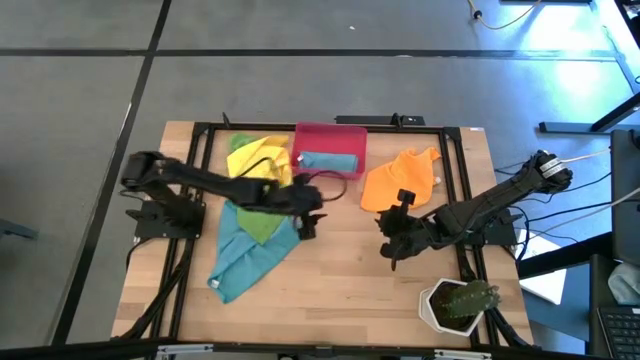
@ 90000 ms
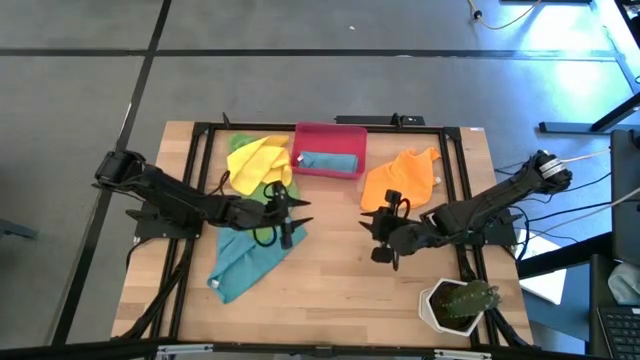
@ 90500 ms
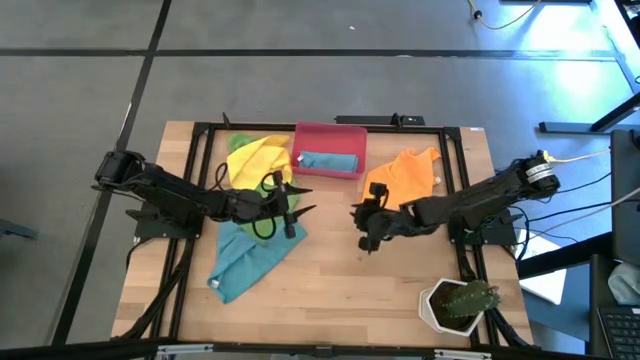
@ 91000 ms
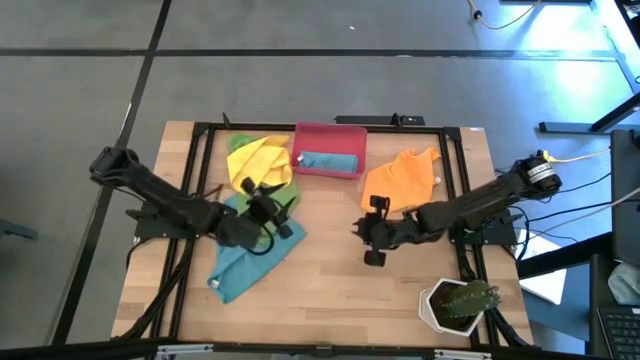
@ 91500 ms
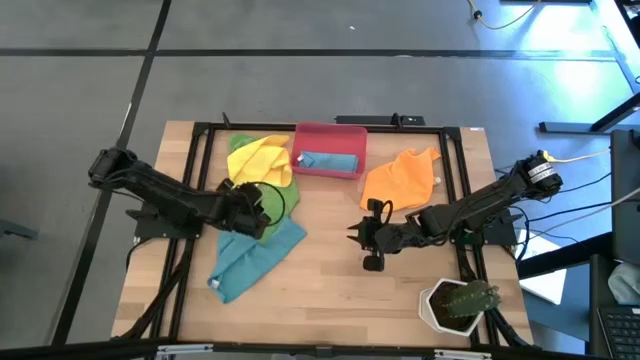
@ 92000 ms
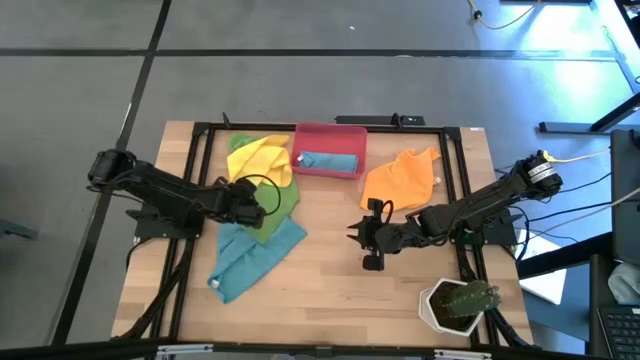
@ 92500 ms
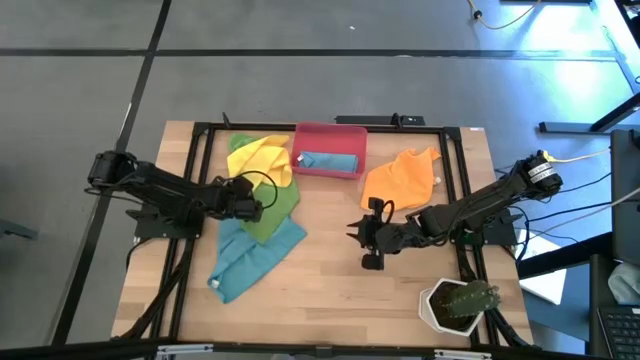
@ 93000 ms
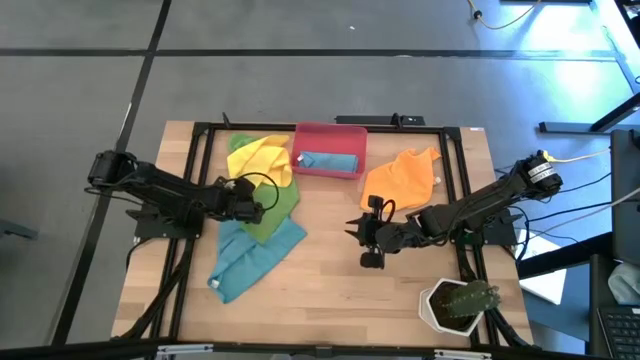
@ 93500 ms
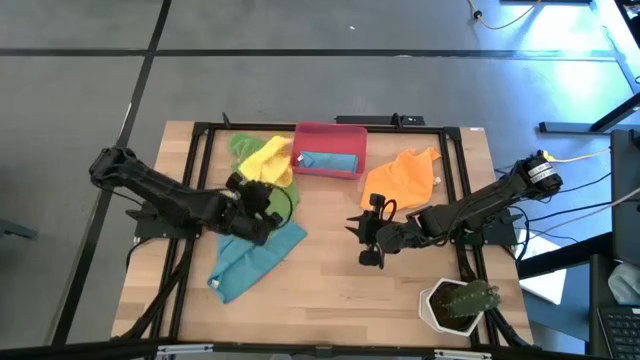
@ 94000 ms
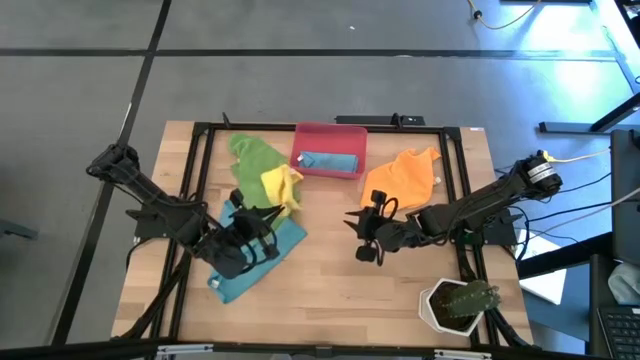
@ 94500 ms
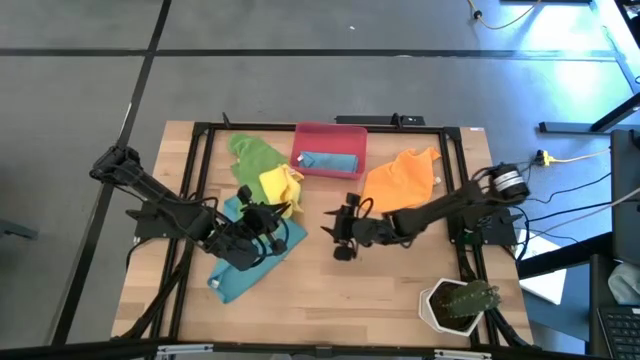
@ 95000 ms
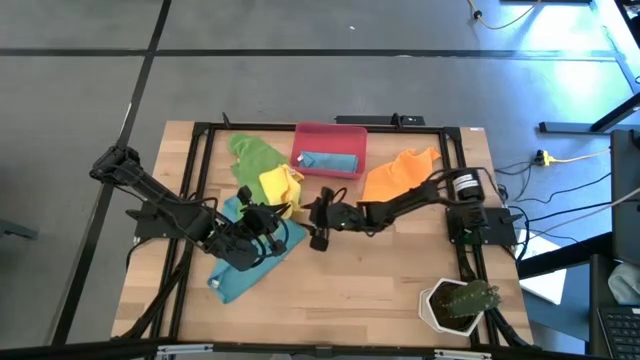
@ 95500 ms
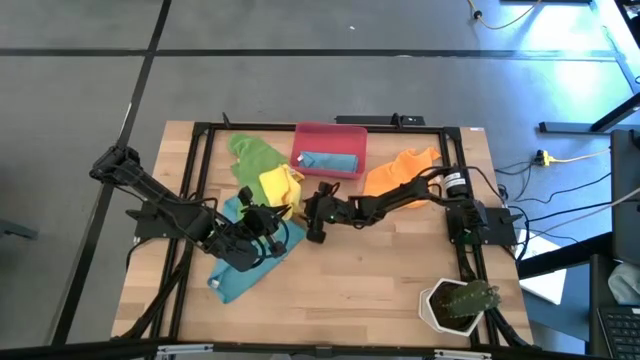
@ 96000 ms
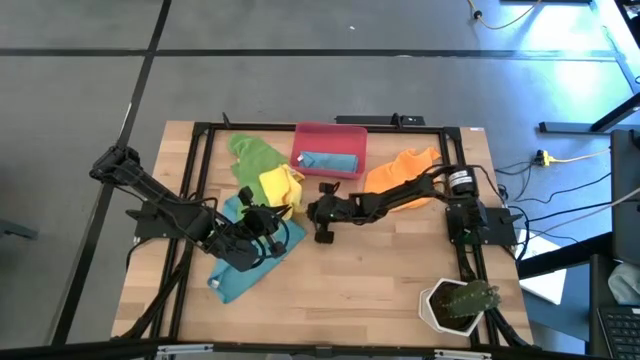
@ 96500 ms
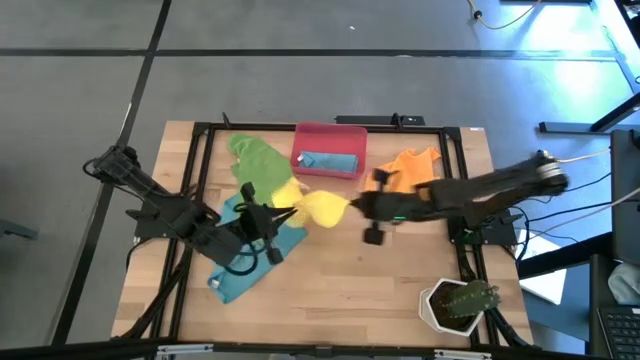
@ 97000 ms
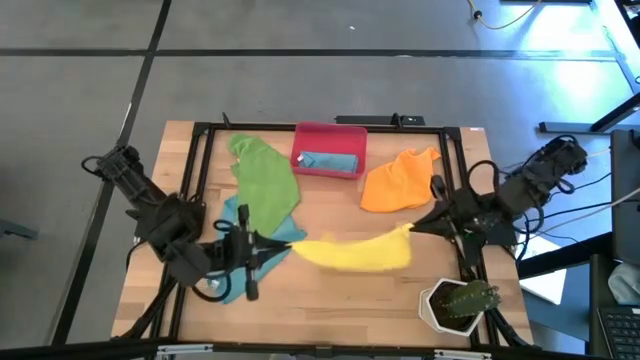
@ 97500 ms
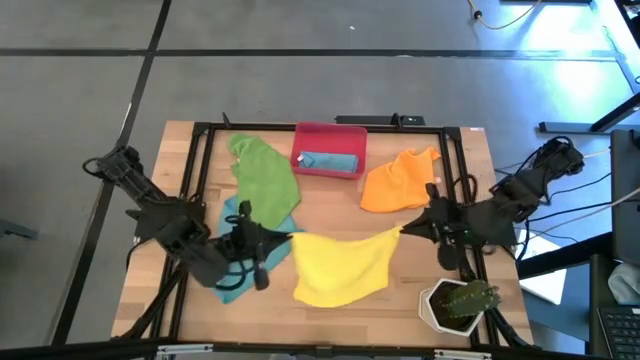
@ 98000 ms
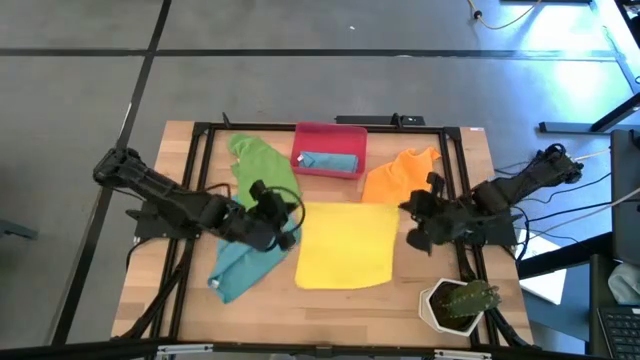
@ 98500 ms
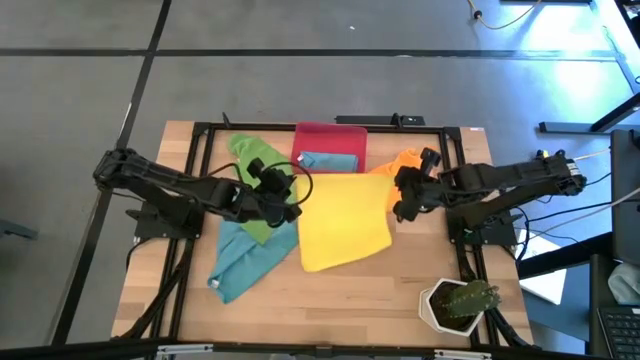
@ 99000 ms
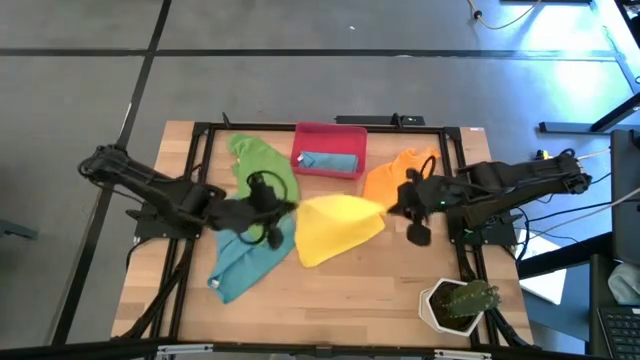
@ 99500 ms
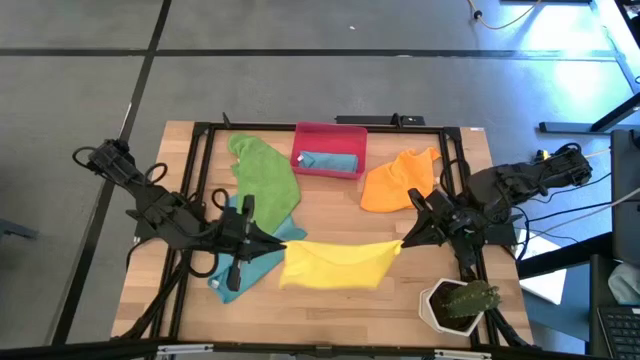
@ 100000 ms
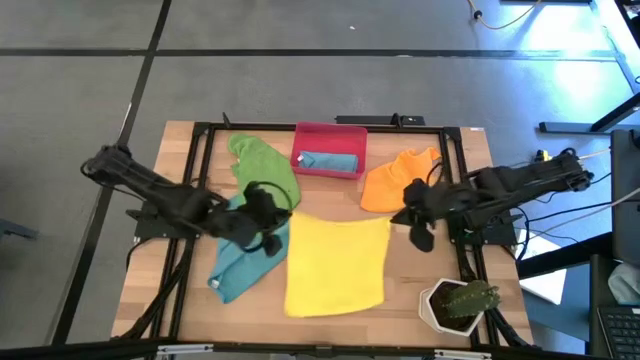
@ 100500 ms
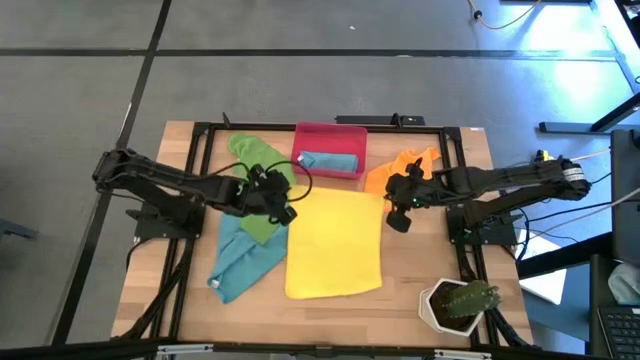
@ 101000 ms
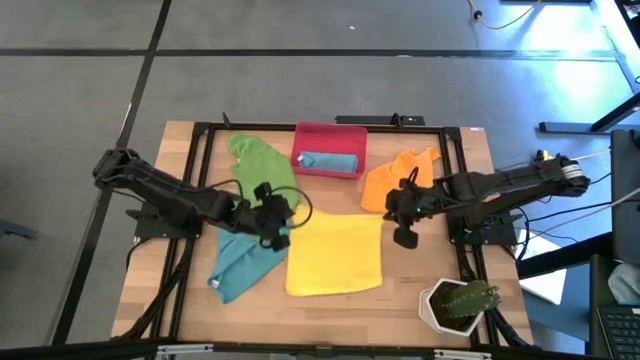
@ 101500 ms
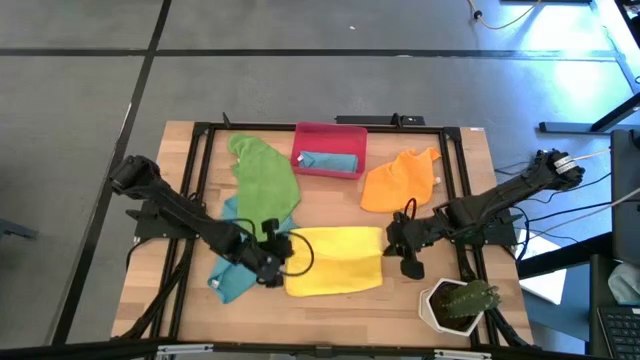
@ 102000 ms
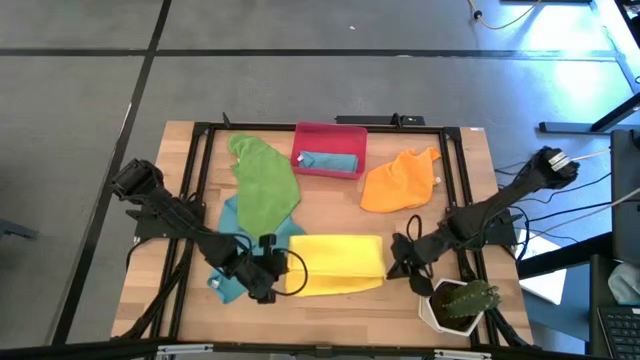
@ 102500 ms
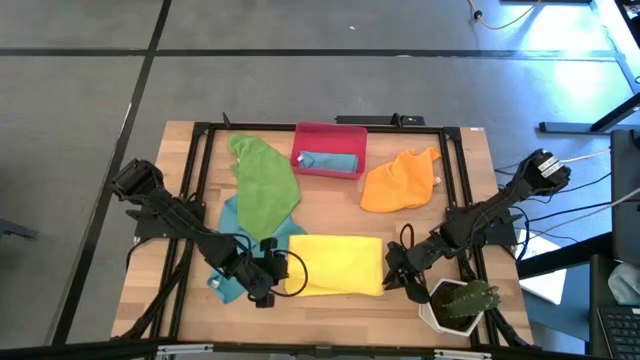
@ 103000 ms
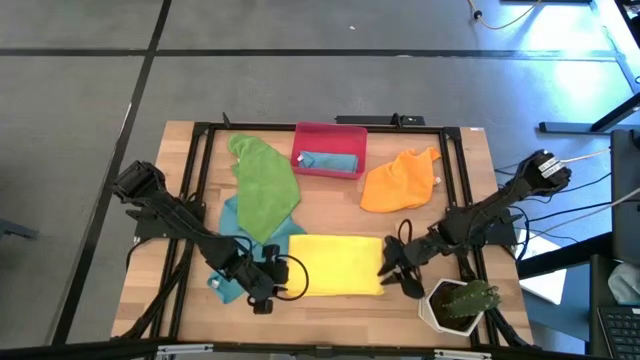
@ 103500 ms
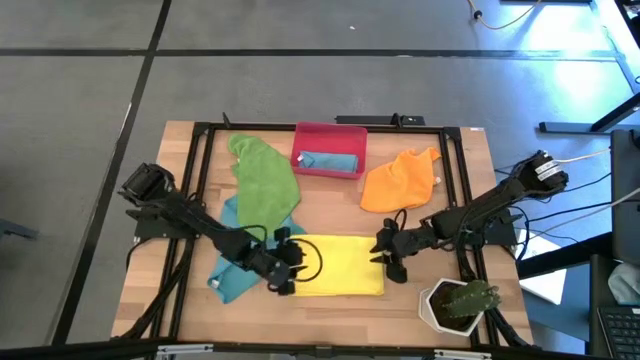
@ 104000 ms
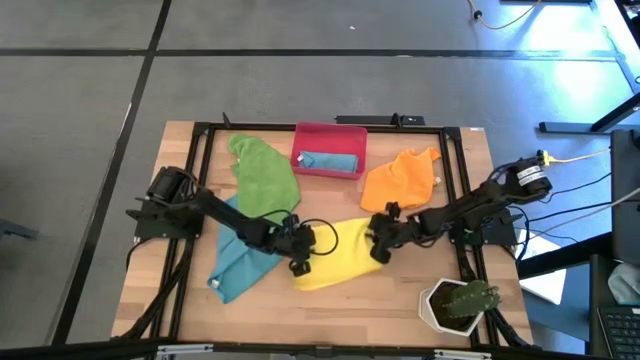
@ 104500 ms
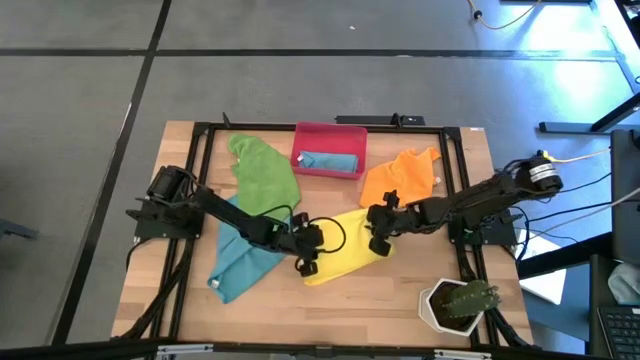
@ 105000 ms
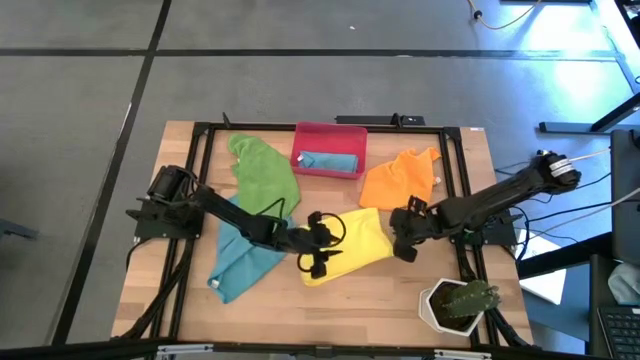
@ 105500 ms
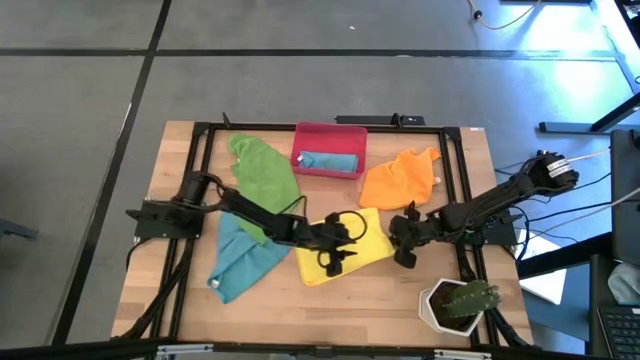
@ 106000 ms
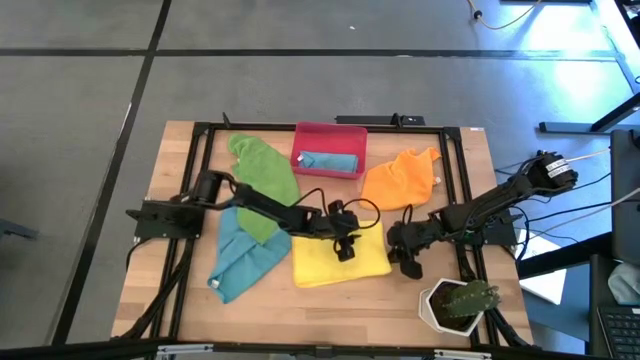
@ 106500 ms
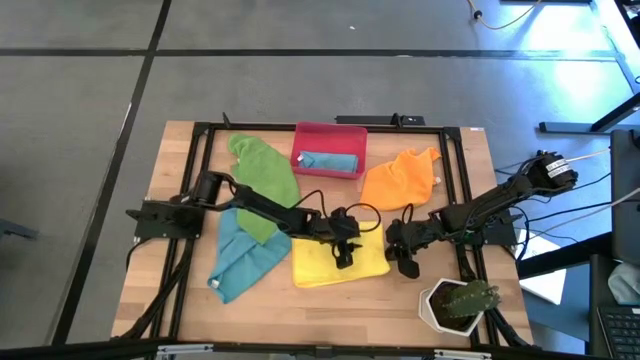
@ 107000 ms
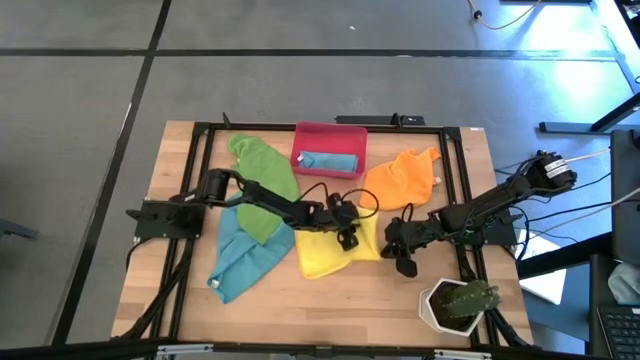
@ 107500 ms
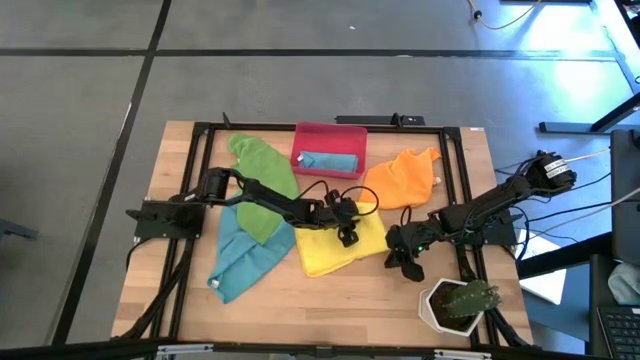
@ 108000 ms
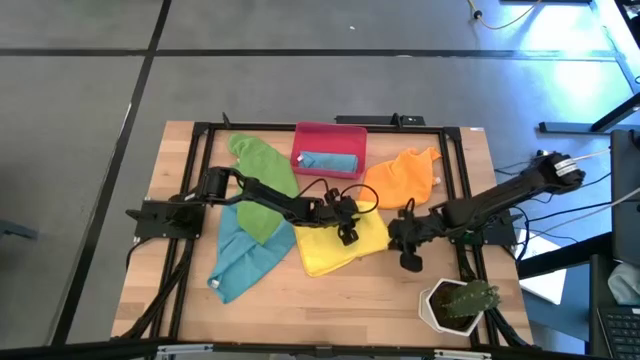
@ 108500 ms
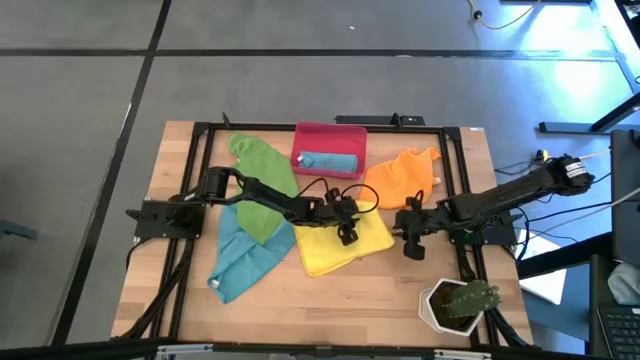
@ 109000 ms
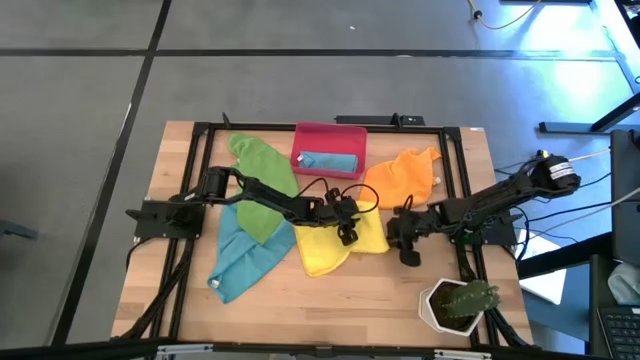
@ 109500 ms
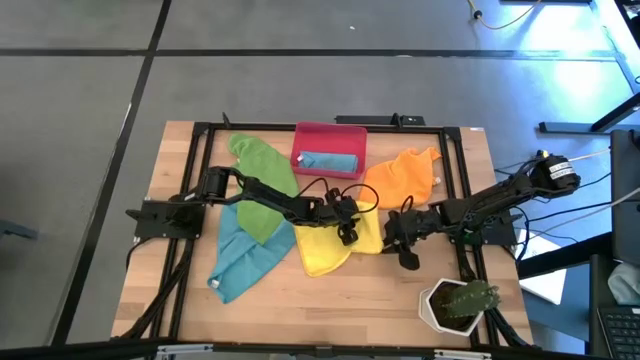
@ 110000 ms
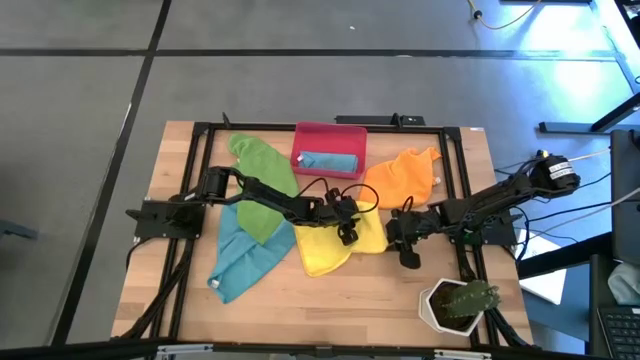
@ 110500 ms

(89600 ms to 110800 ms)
Task: Roll microfiber towels into tight, uniform cylinder then place into a basket
Fold the yellow microfiber towel

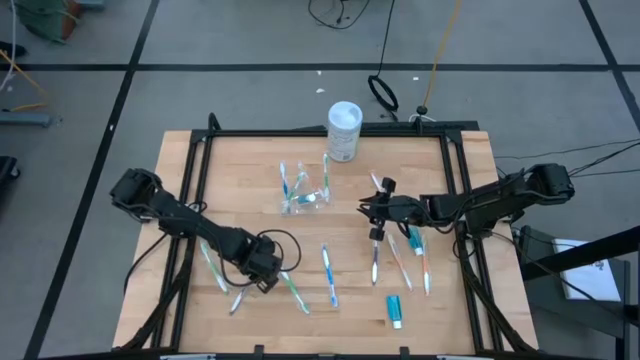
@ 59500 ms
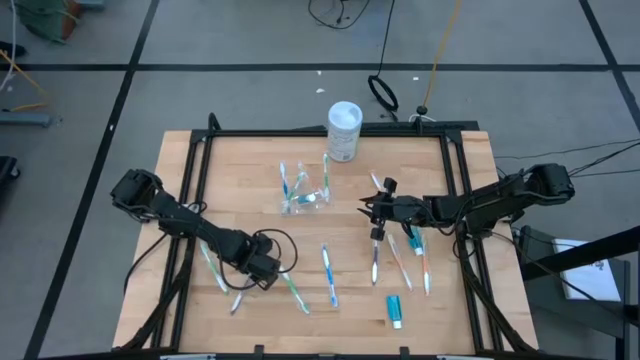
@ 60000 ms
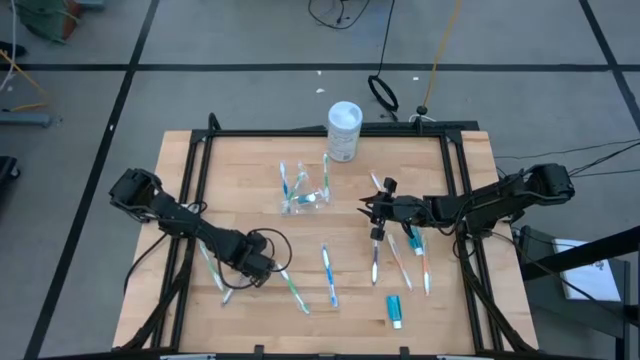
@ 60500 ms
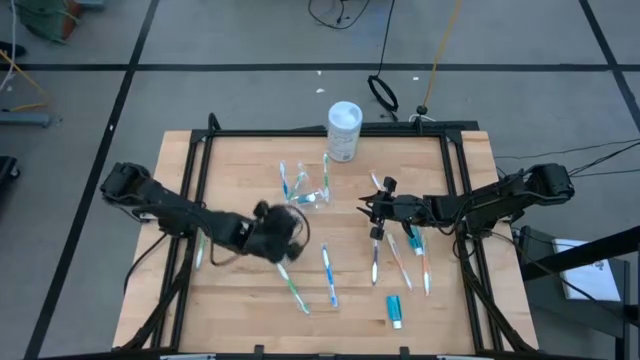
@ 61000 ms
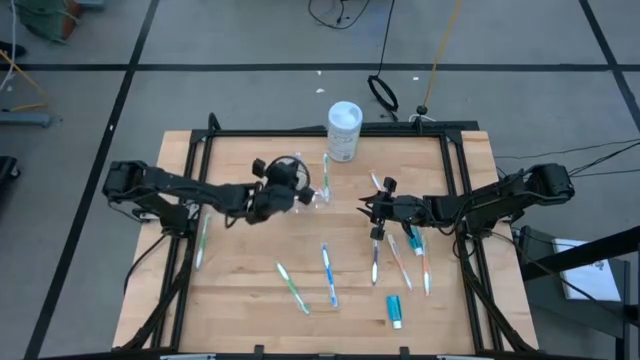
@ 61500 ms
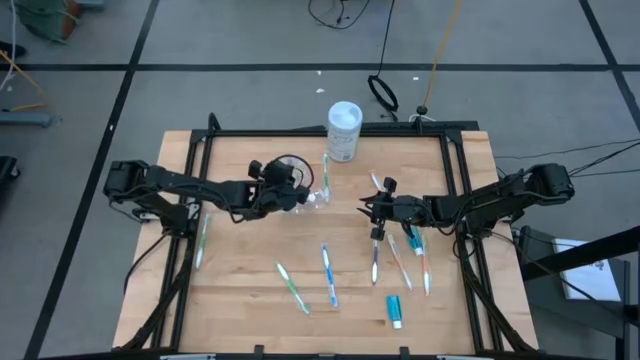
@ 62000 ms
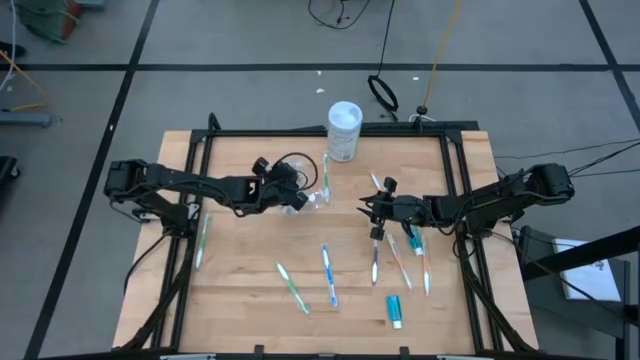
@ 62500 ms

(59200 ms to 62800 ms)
Task: Pick & Place toothbrushing station
Put the violet toothbrush into the transparent organizer
